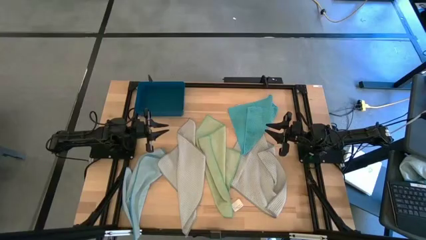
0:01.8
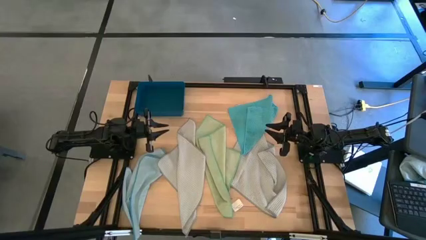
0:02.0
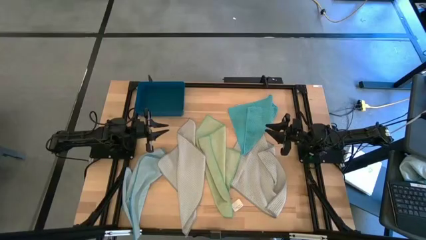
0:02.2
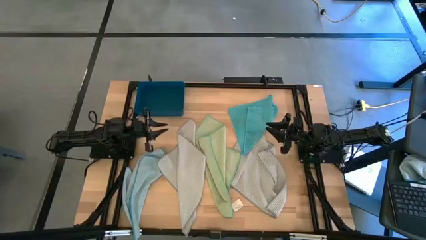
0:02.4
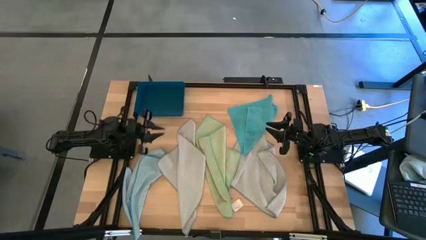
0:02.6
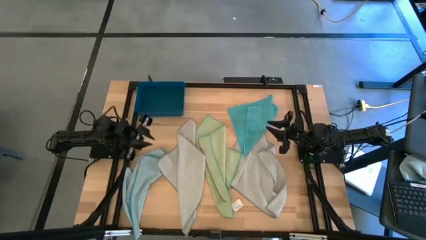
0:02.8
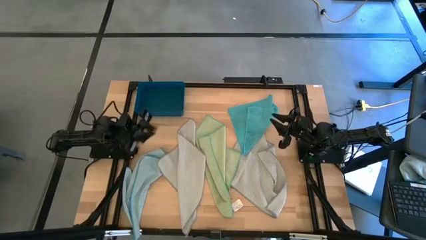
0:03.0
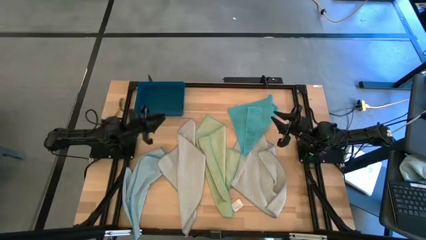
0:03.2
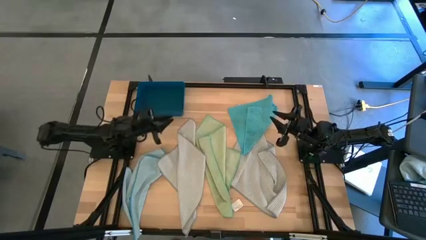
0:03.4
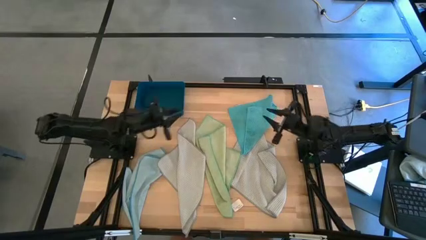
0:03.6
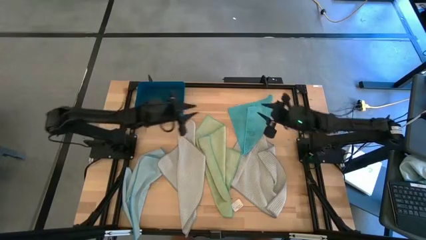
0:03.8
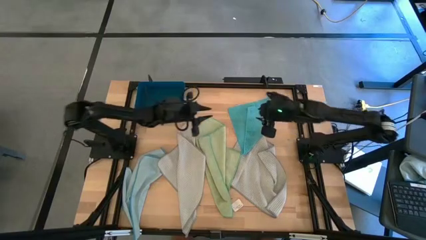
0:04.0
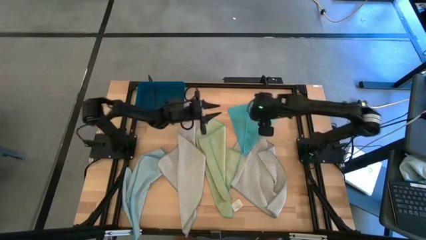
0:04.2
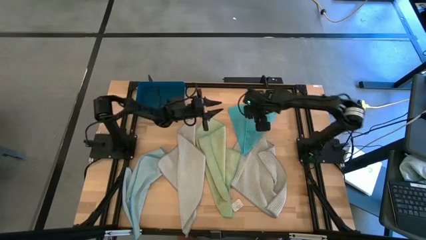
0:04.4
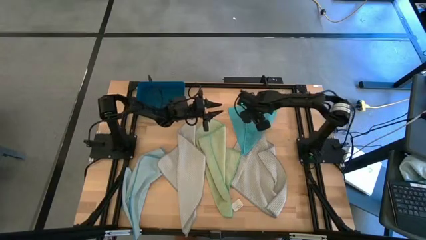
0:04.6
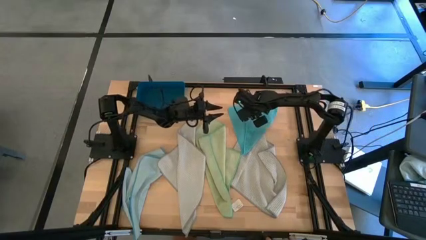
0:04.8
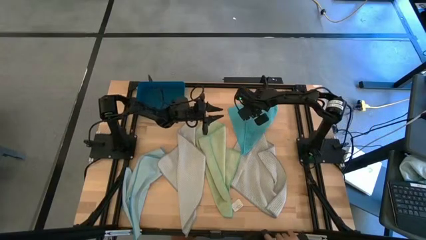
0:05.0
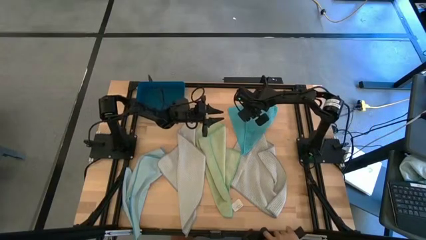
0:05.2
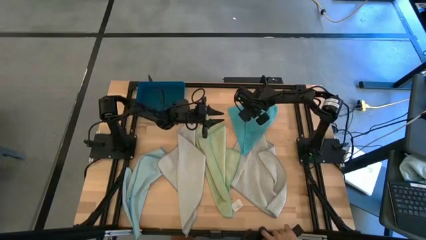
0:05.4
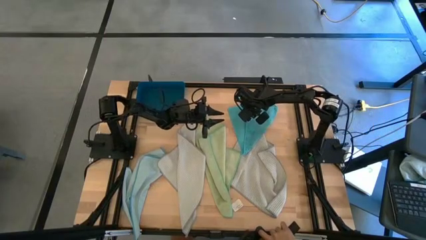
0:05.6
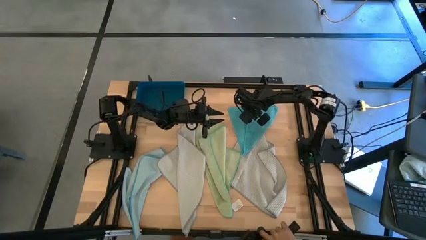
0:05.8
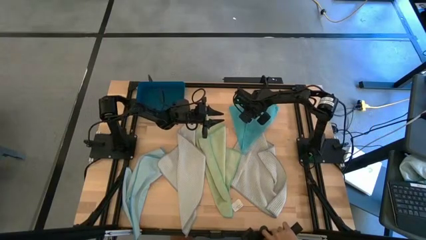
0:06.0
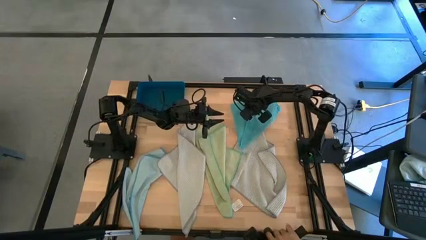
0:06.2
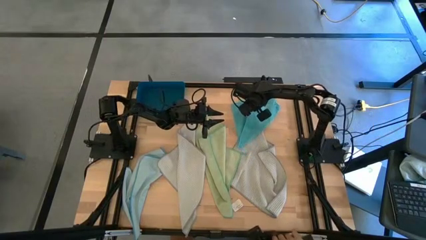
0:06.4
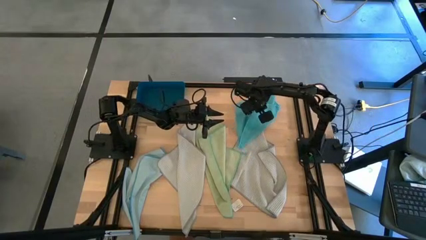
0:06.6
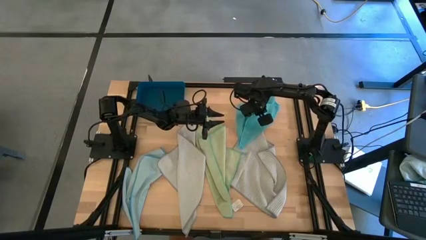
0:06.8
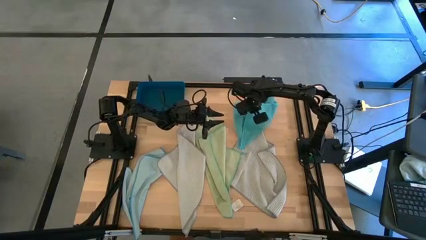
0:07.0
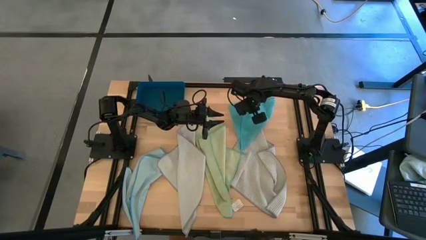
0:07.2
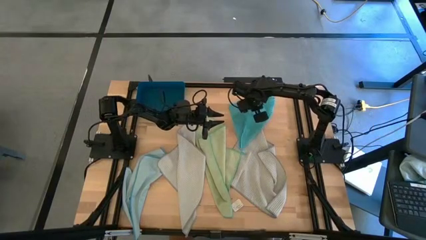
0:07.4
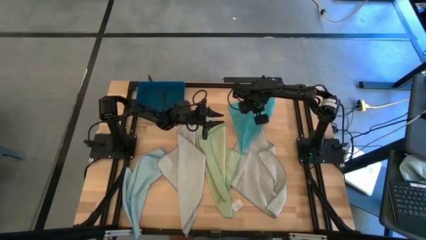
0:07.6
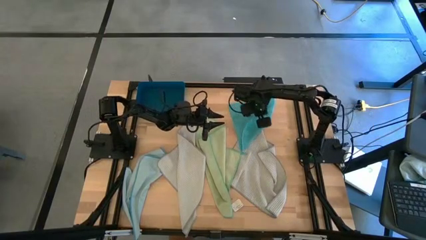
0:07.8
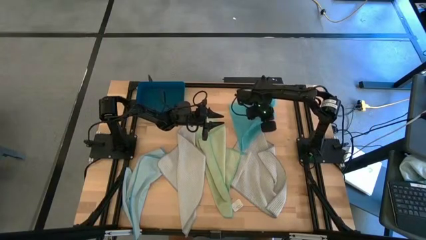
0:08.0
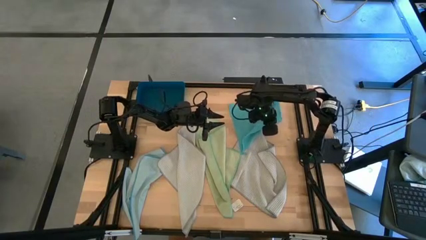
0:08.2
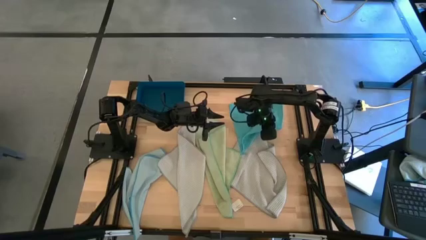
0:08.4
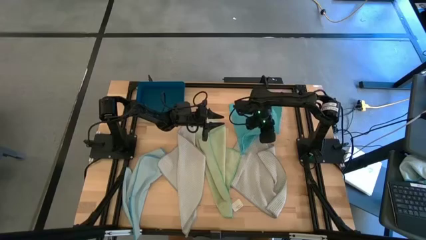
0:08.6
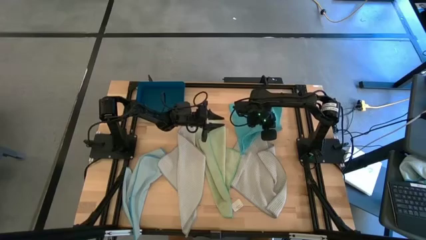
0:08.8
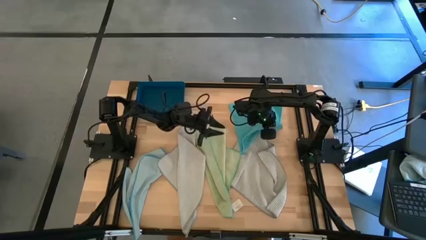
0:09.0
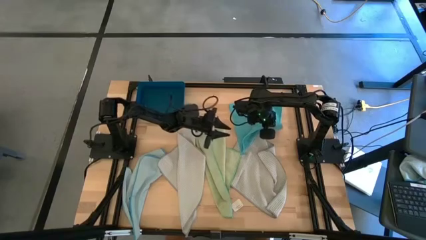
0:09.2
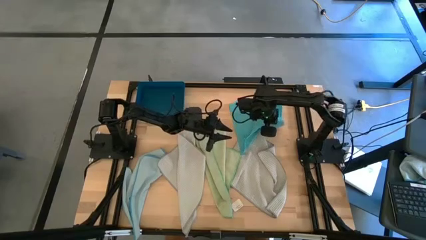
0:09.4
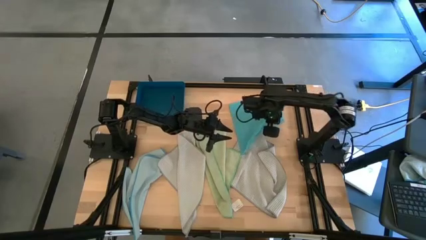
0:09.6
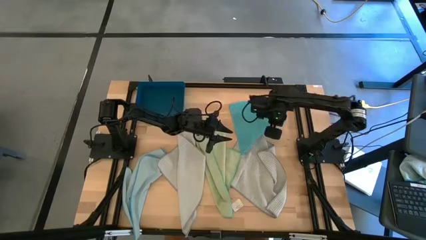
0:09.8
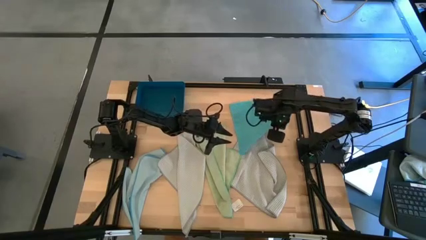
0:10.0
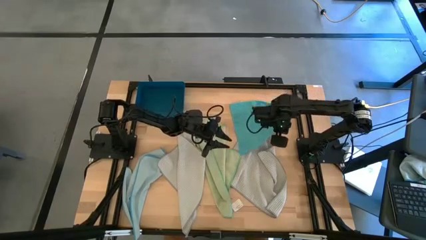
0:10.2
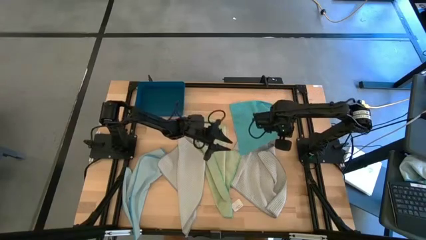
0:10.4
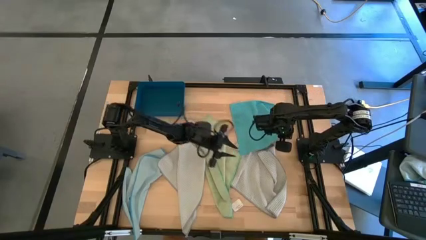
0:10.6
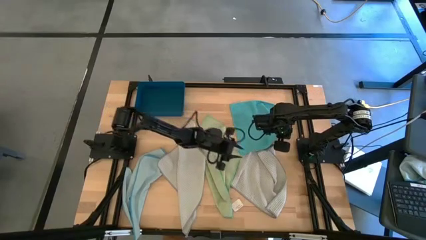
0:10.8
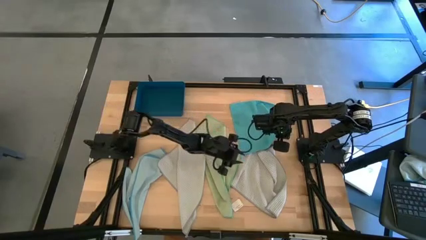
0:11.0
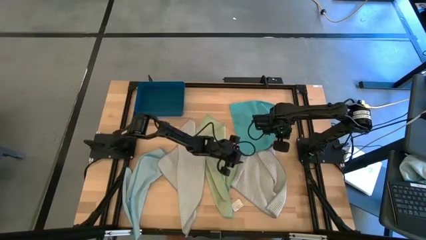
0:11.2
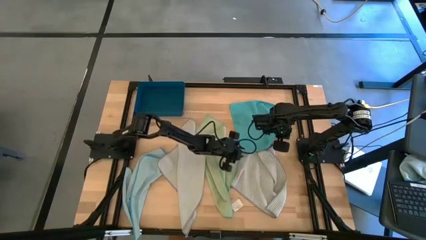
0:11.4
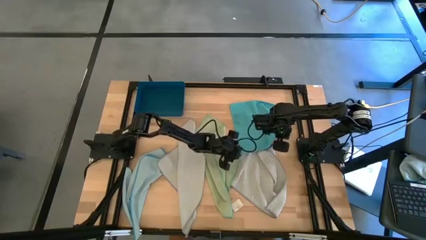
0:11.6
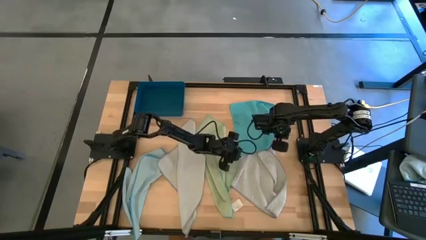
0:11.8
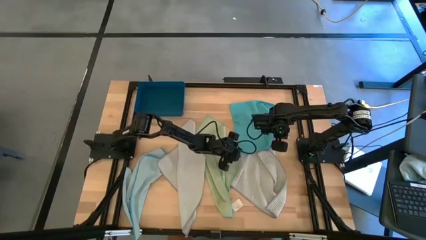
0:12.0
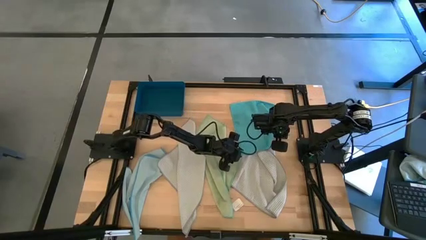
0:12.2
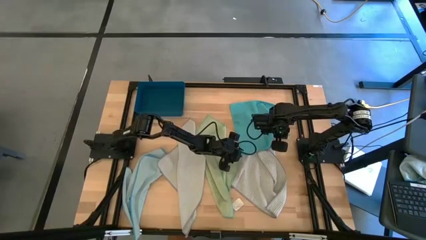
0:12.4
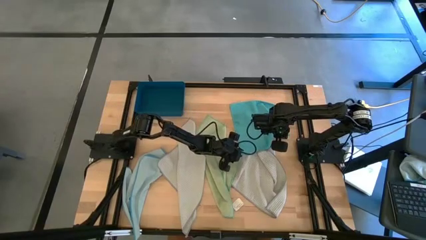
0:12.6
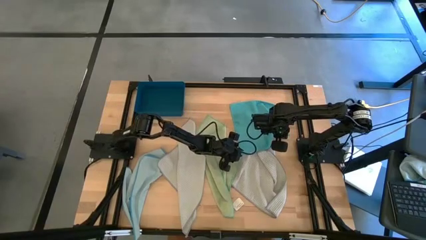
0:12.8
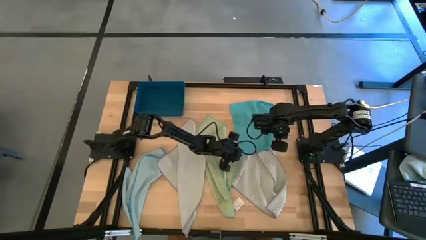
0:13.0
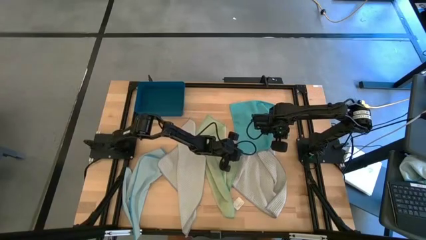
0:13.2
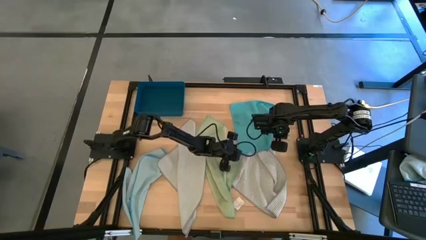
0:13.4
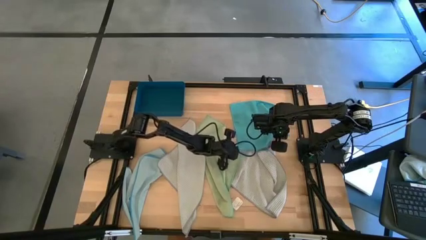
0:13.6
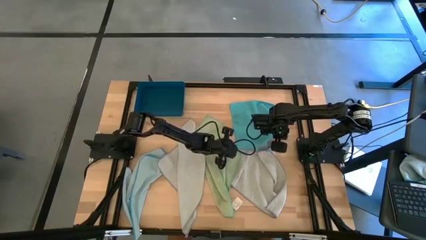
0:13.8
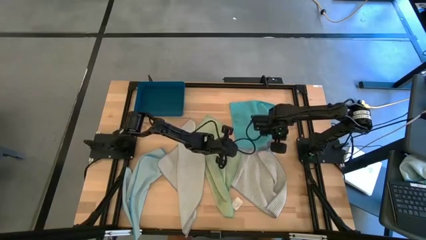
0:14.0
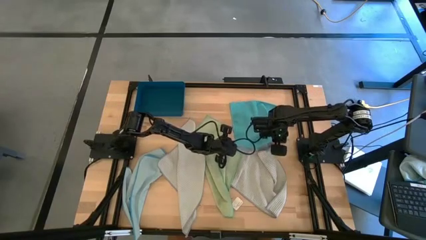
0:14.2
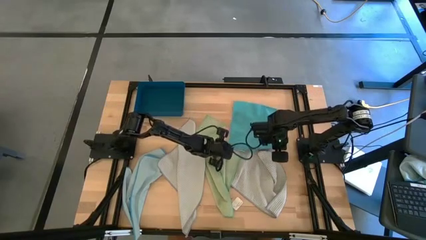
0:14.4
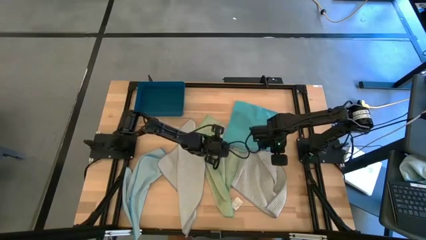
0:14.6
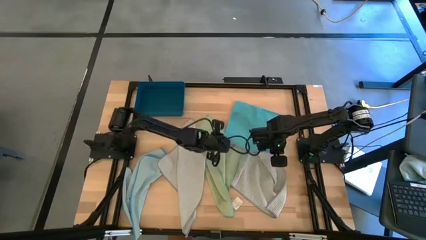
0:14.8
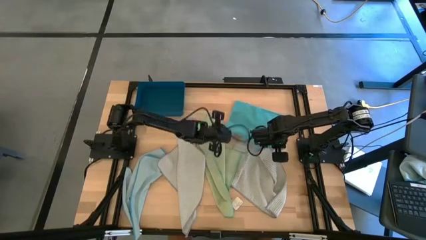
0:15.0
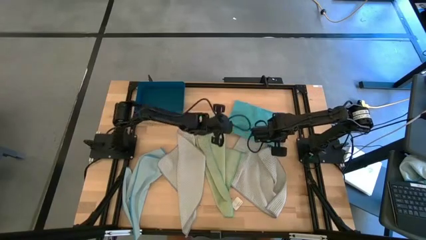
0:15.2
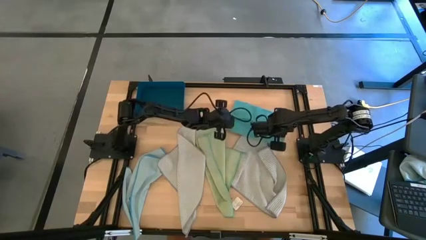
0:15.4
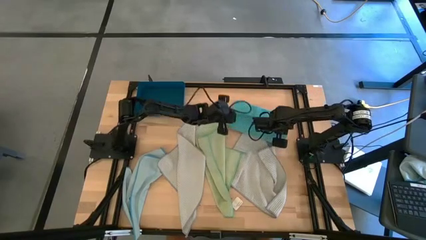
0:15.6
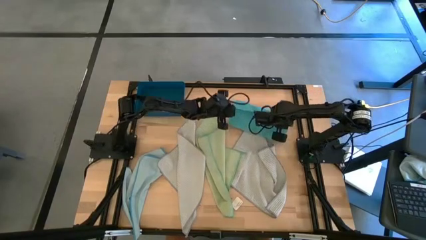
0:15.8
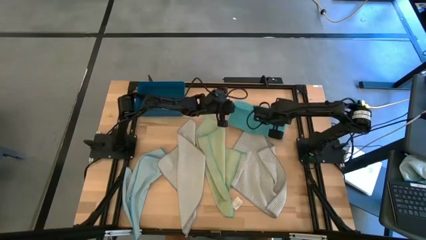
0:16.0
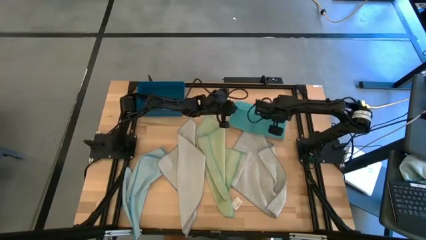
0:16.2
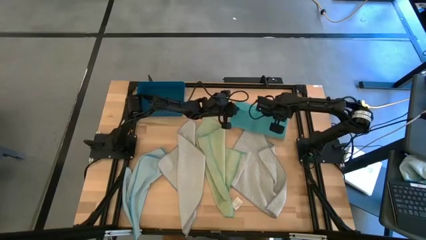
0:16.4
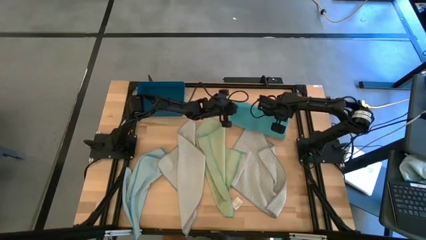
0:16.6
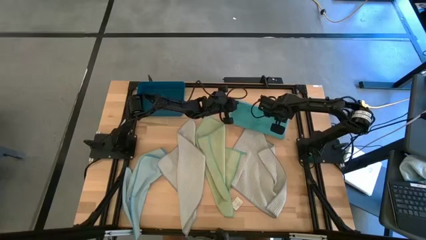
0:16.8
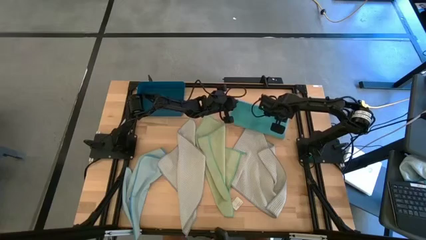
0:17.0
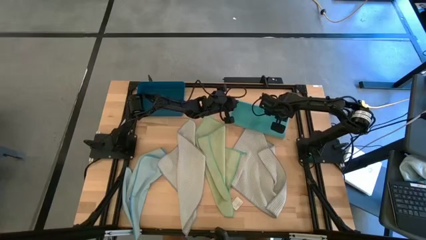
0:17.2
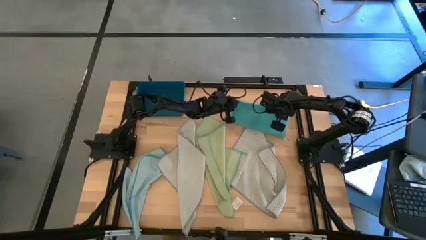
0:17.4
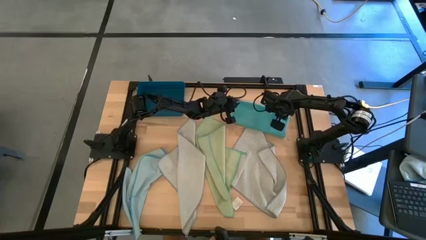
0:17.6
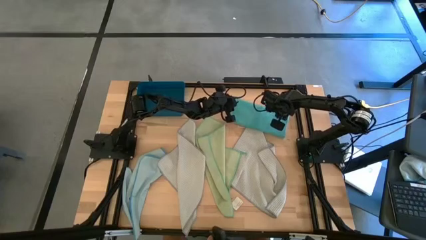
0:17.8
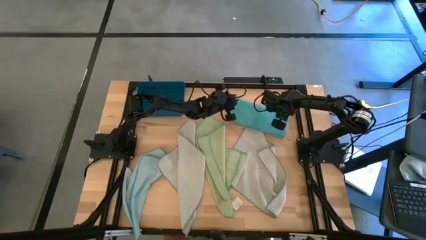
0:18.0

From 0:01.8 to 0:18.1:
Task: Fold microfiber towels
Fold the blue towel
